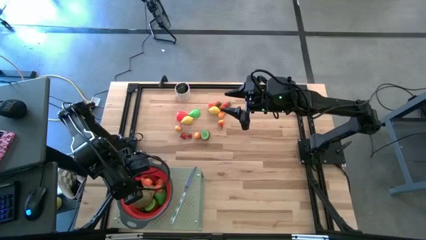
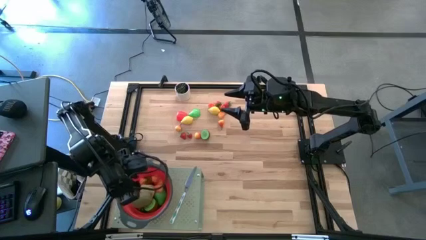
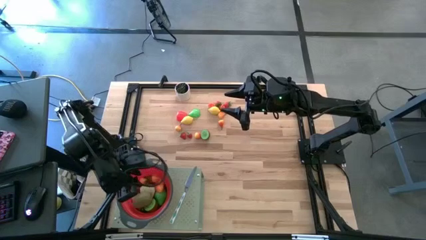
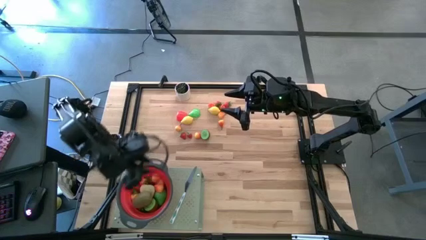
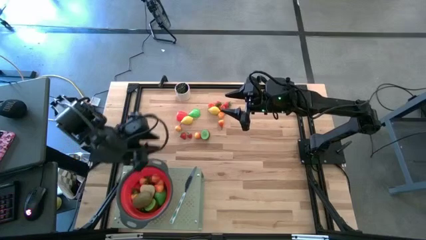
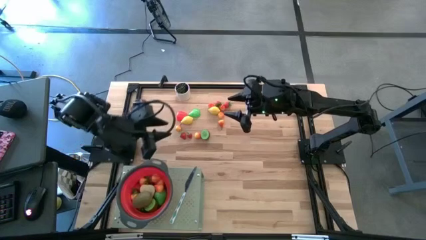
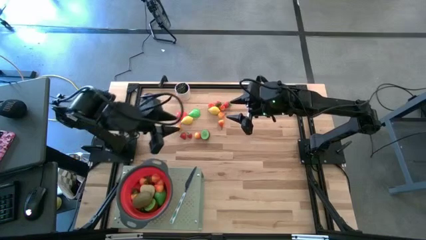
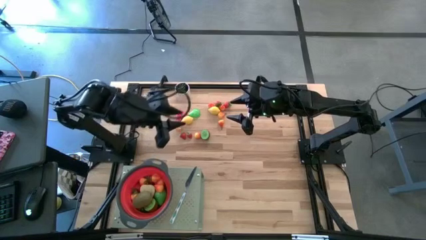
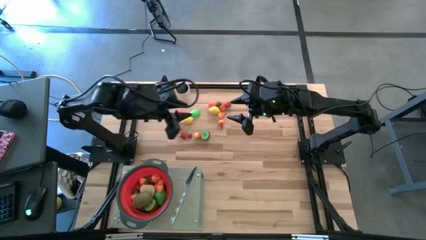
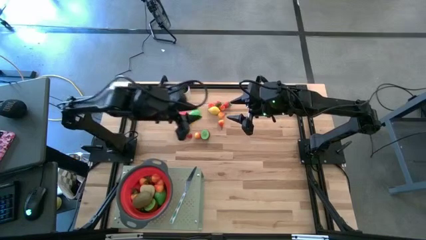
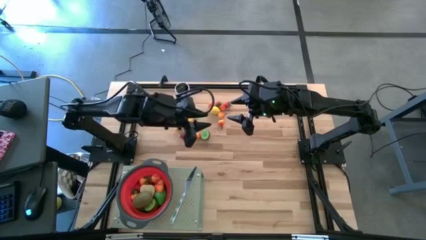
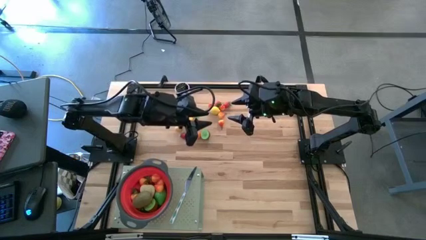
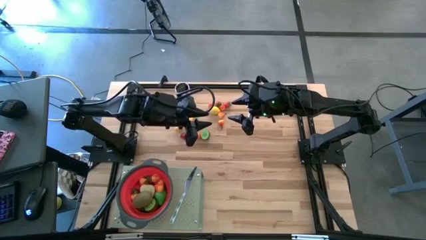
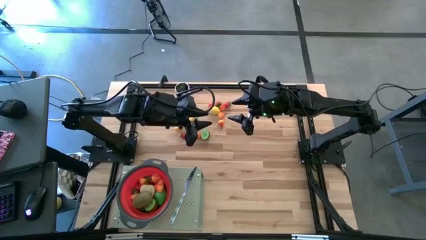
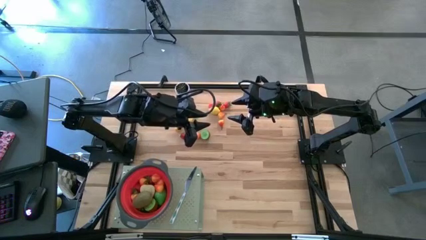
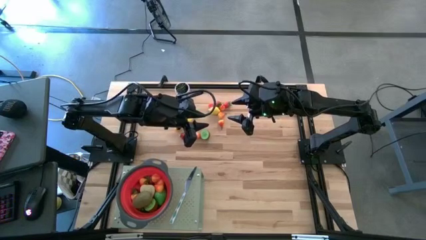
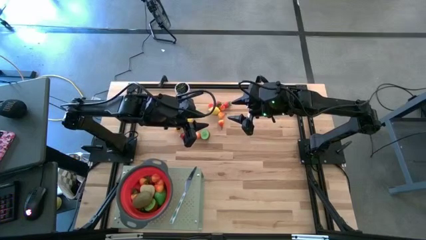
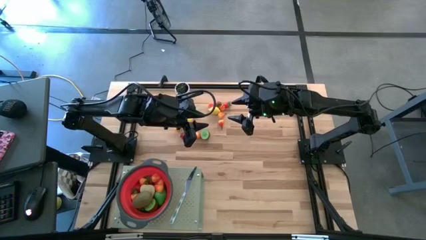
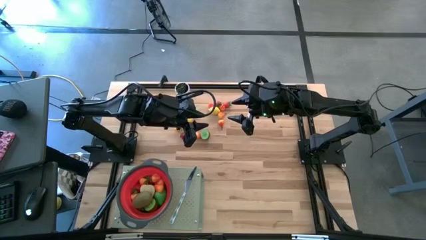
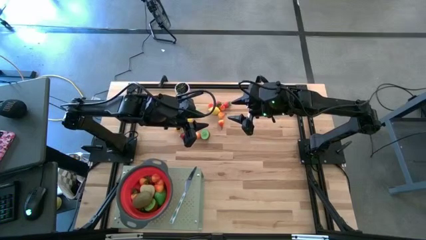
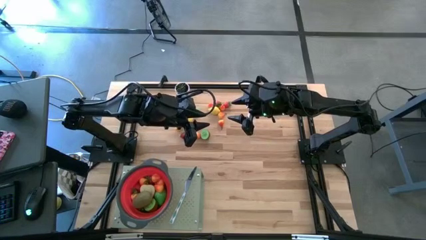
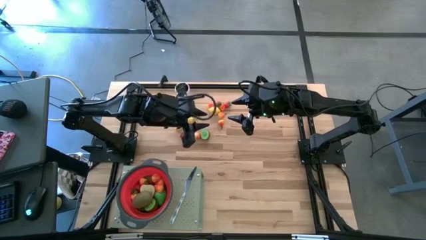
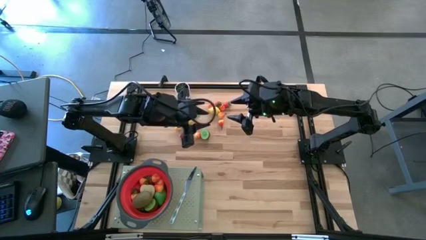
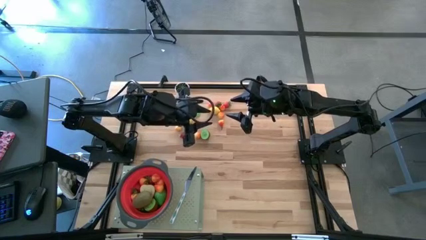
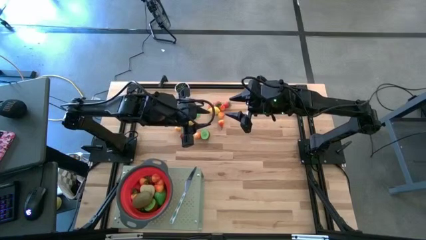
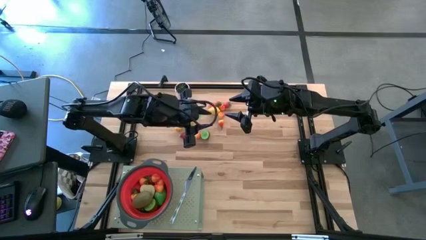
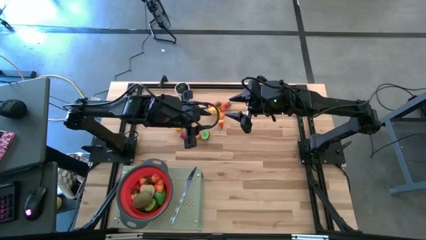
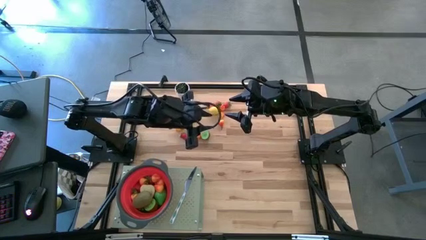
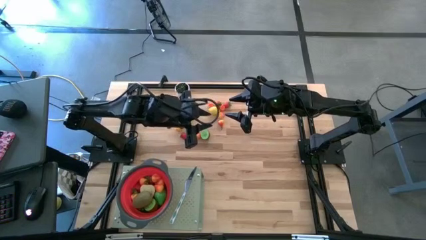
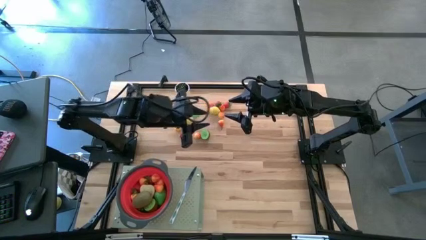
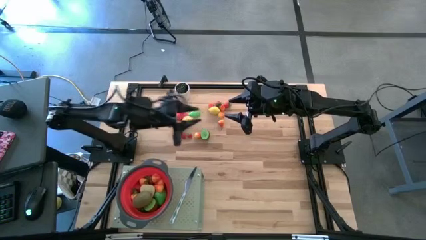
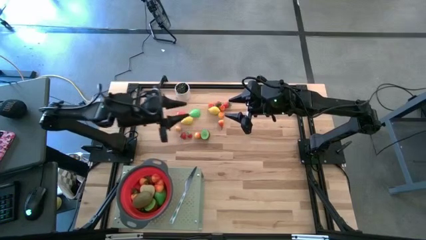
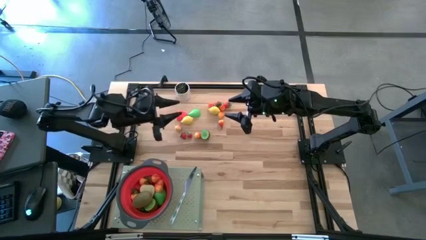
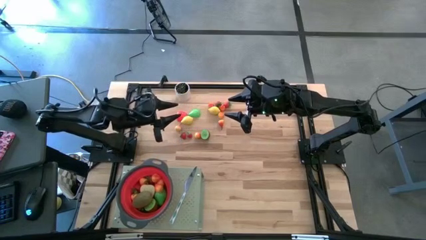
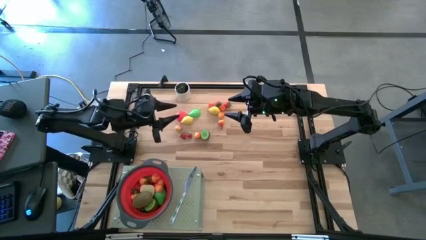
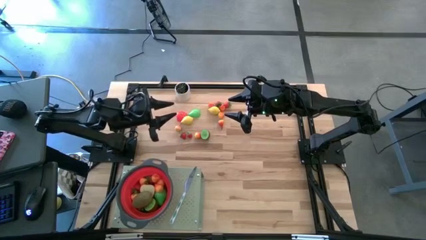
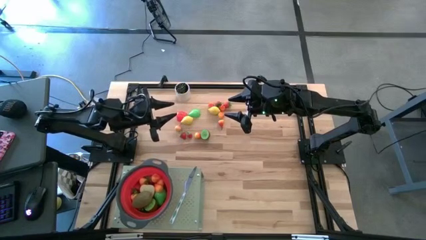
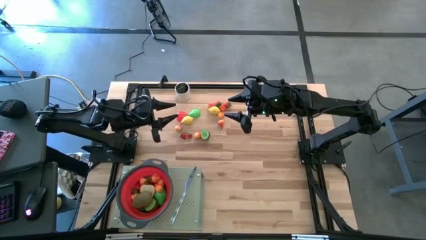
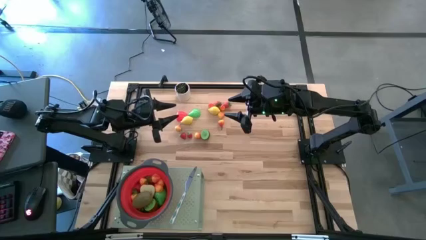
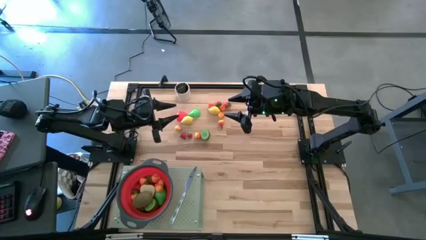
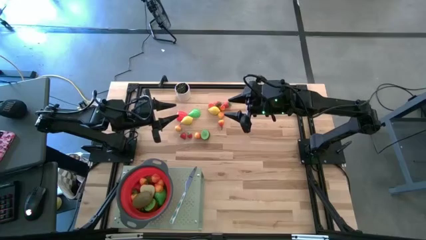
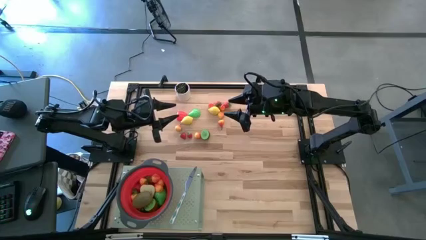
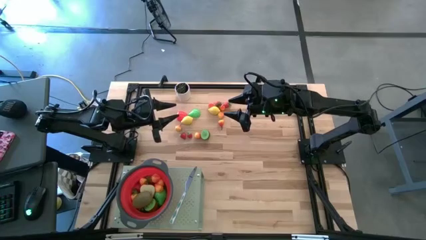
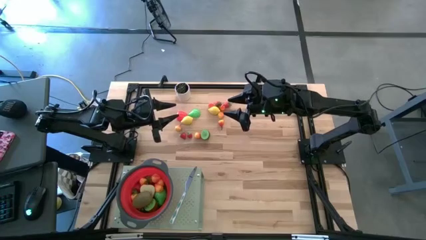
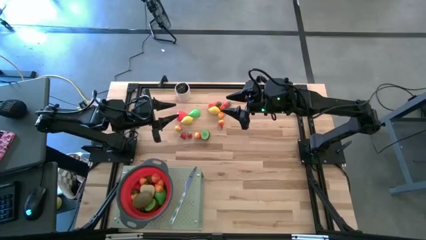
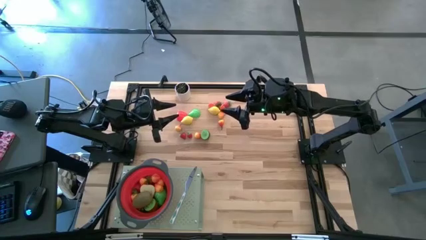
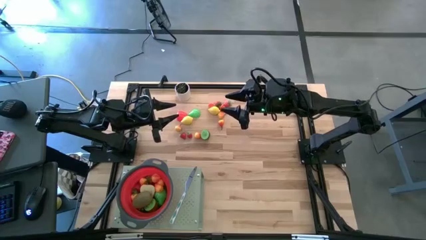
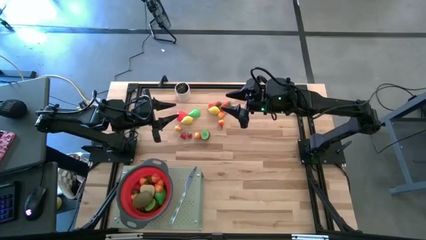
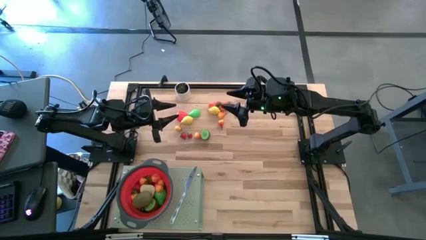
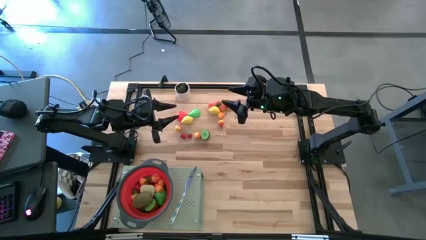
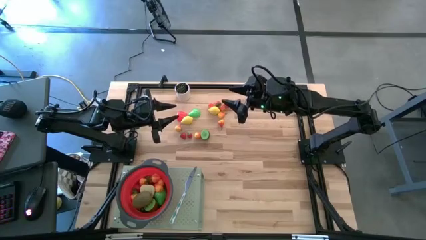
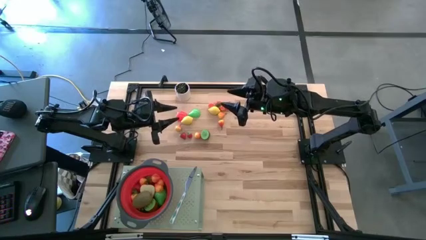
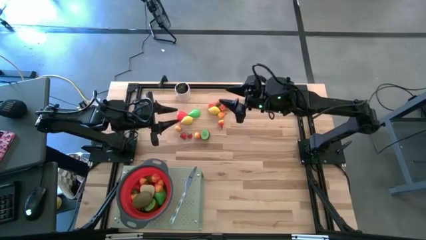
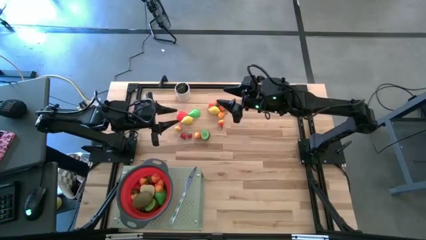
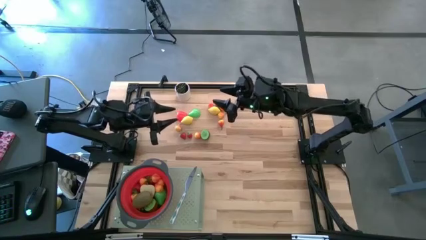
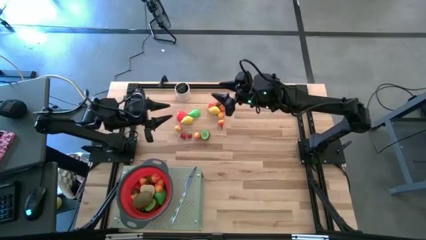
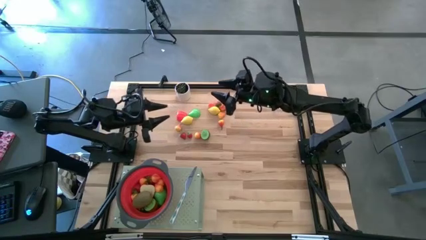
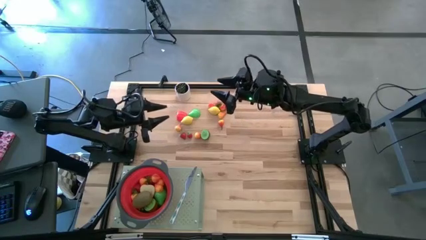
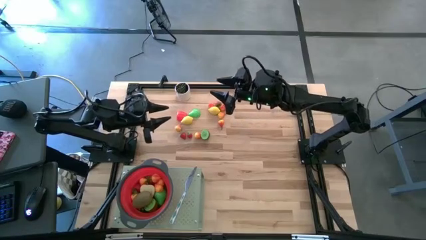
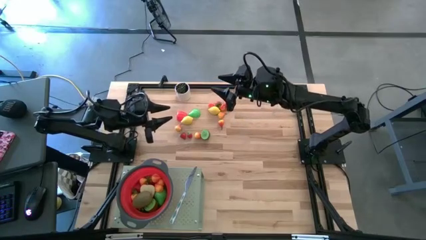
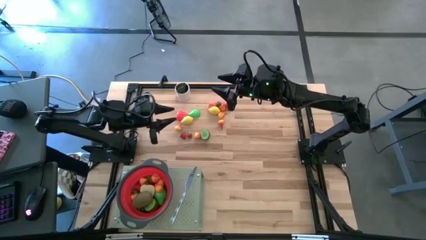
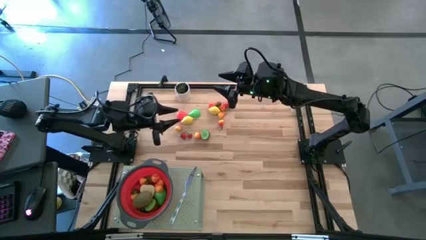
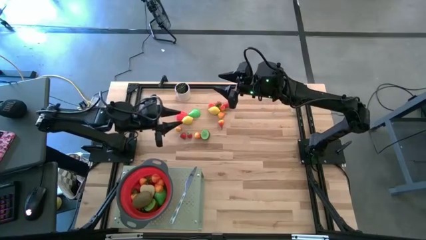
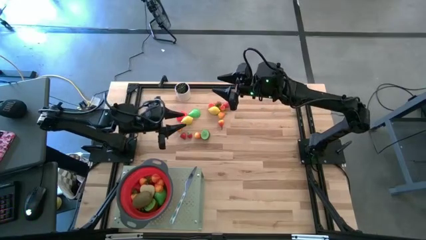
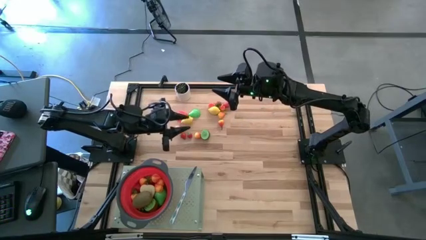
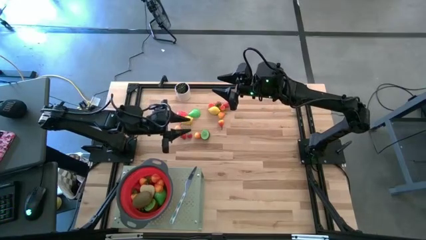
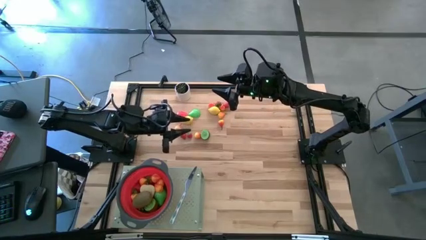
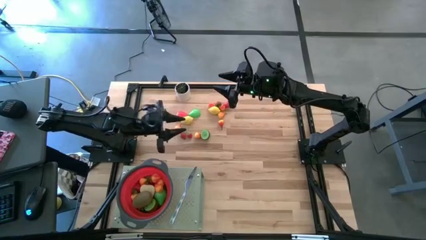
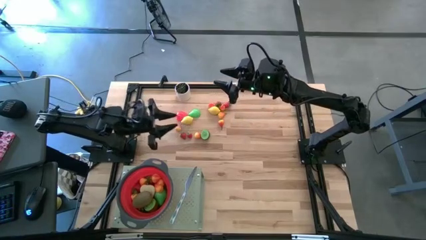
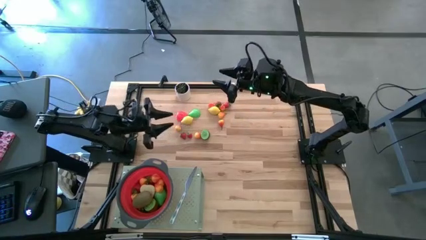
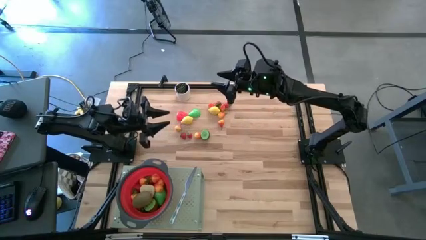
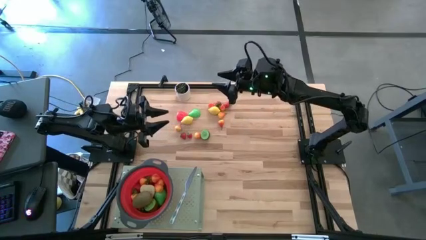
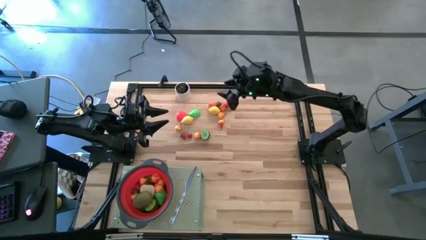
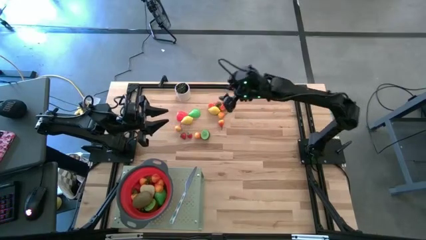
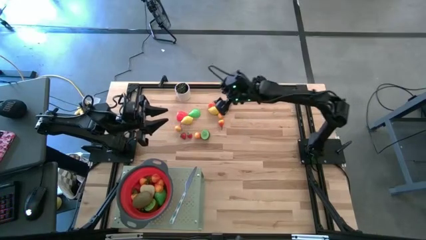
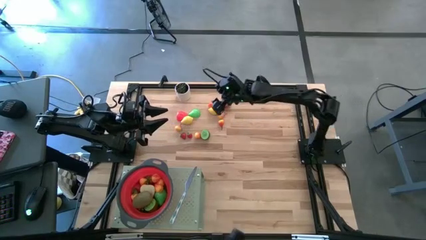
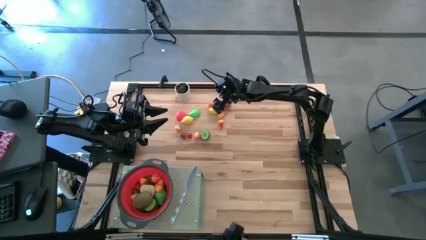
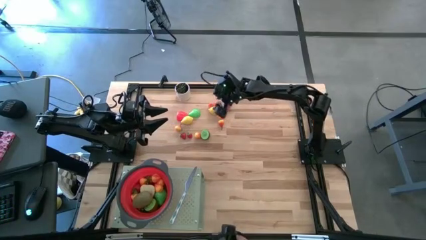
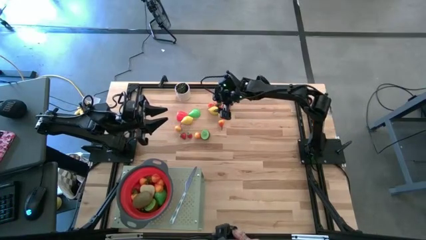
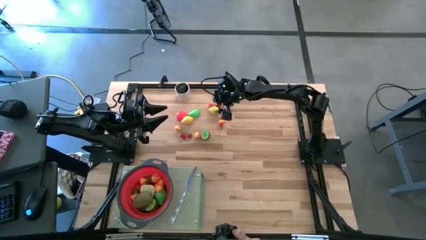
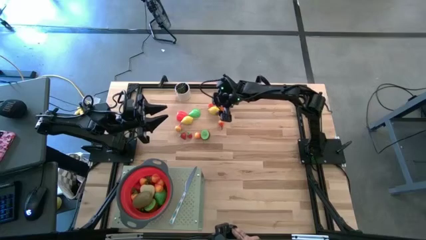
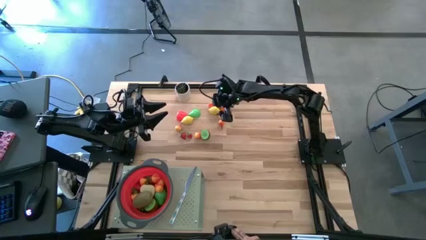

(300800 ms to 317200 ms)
Task: Pick & Place Fruit
Put the strawberry into the red strainer bowl on the shelf
